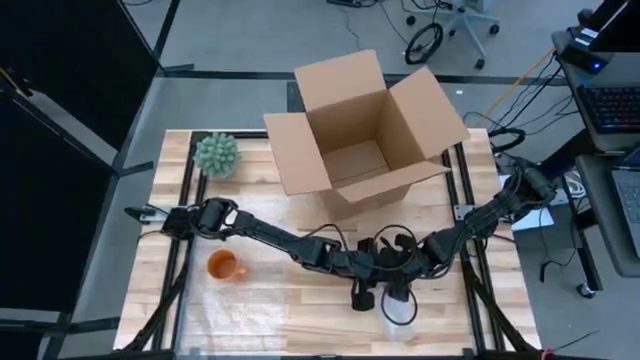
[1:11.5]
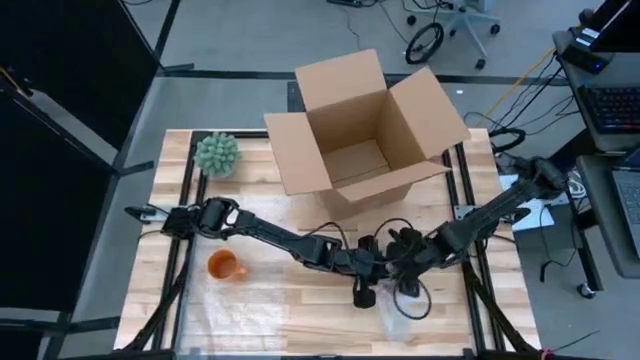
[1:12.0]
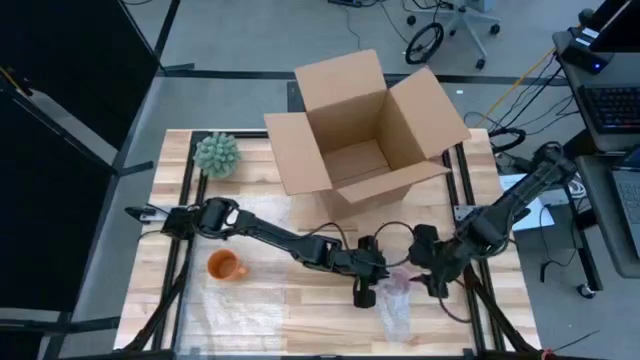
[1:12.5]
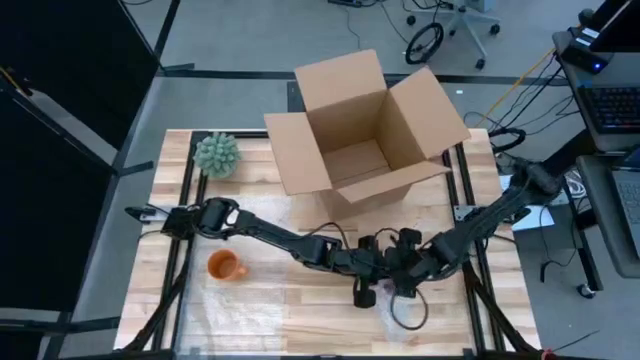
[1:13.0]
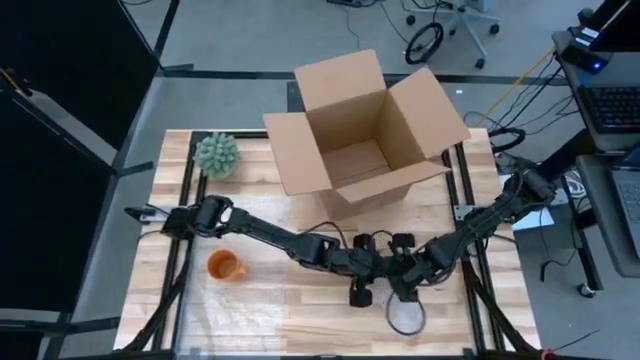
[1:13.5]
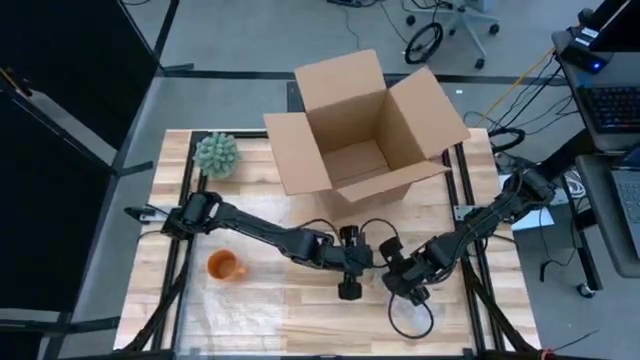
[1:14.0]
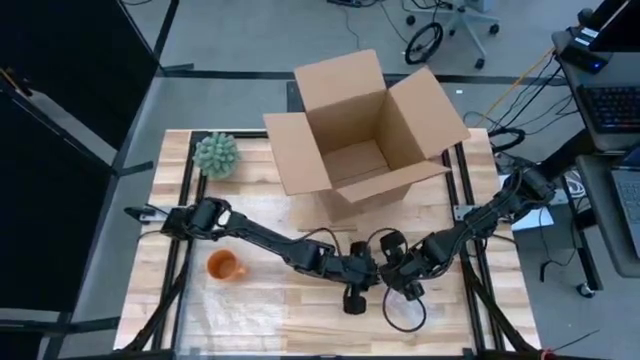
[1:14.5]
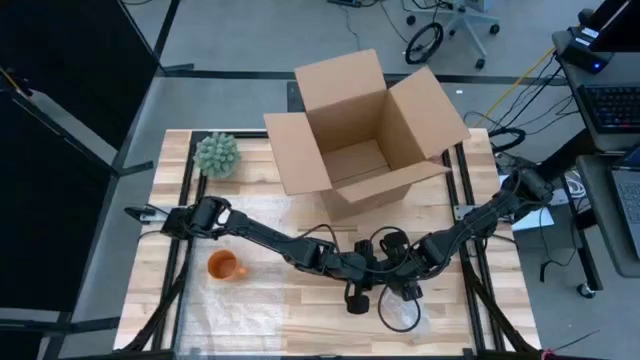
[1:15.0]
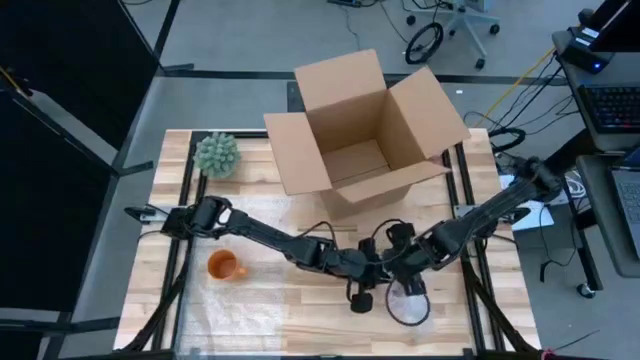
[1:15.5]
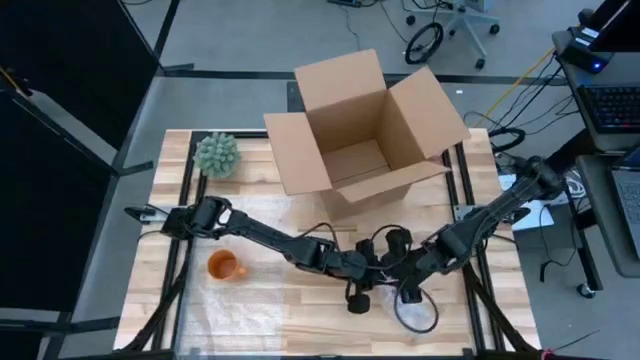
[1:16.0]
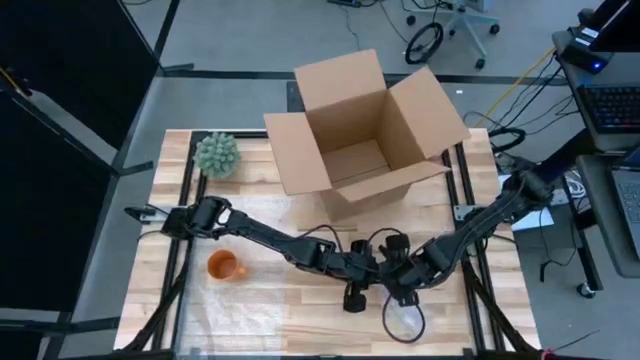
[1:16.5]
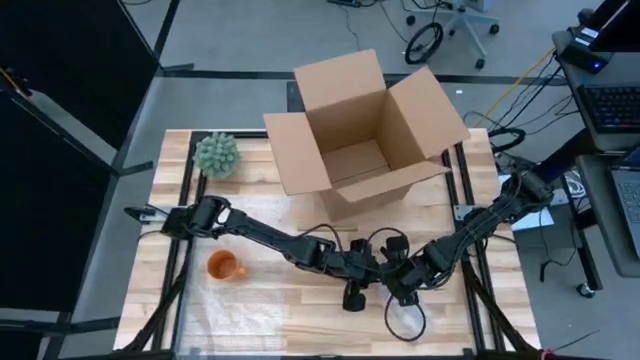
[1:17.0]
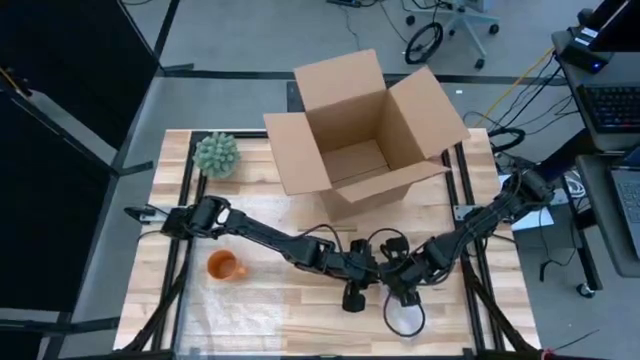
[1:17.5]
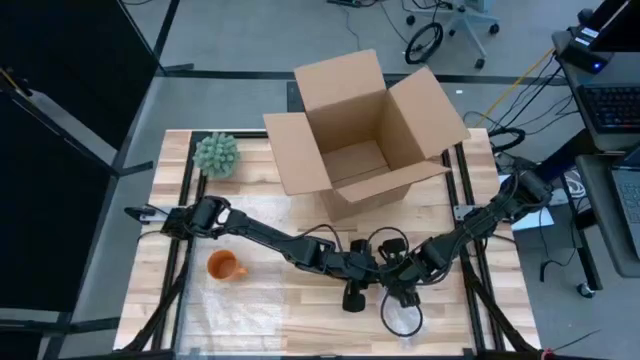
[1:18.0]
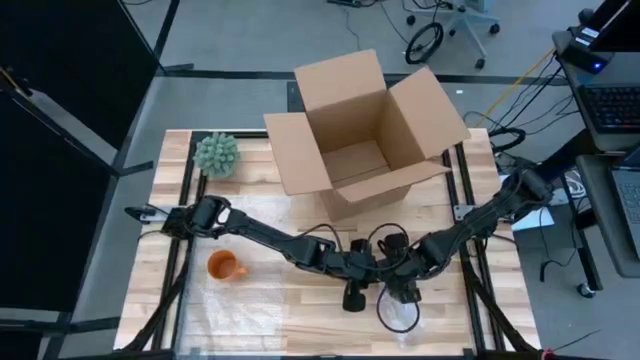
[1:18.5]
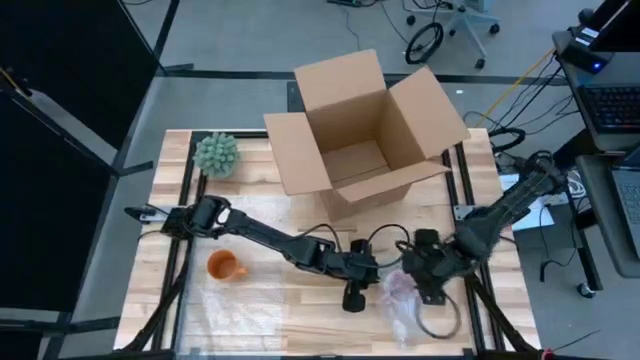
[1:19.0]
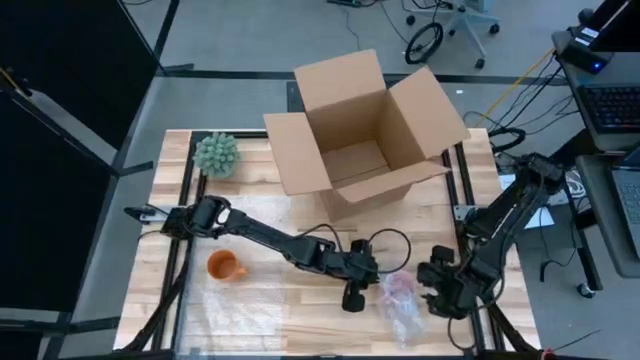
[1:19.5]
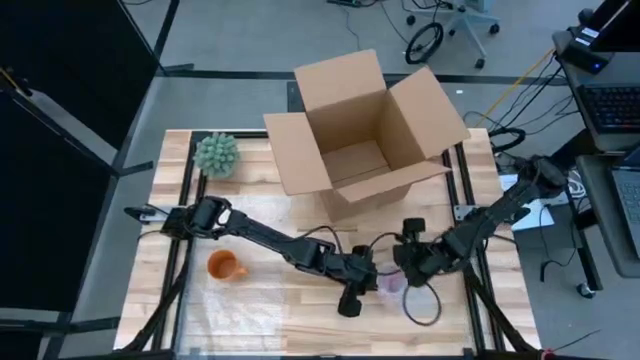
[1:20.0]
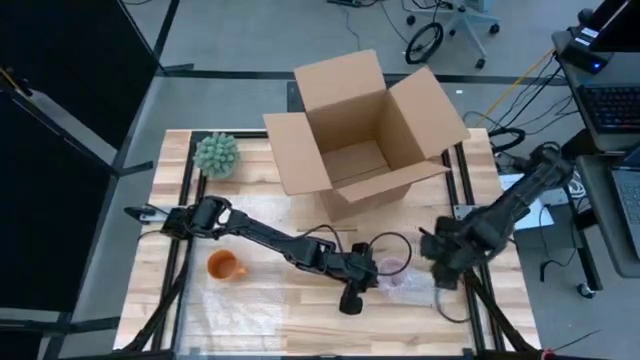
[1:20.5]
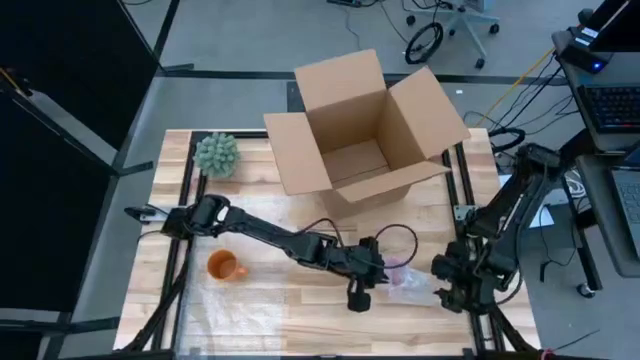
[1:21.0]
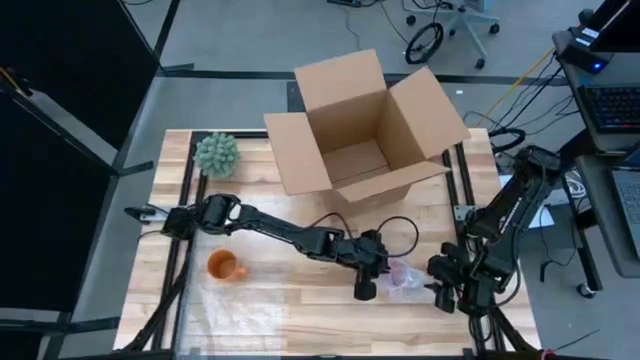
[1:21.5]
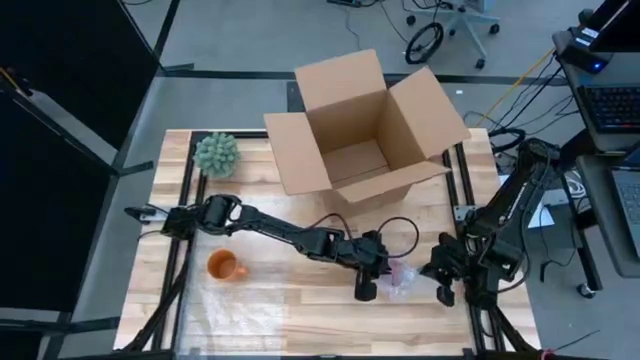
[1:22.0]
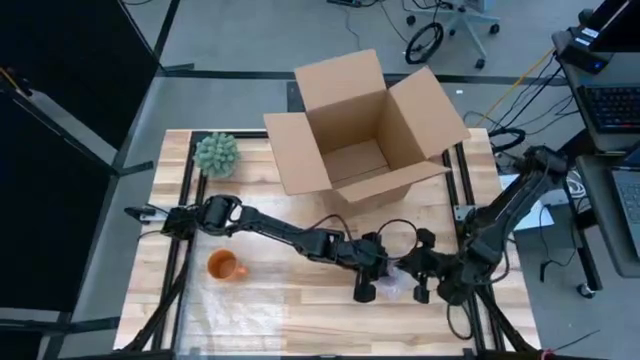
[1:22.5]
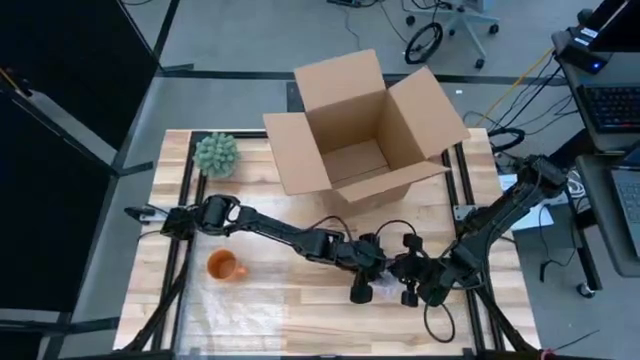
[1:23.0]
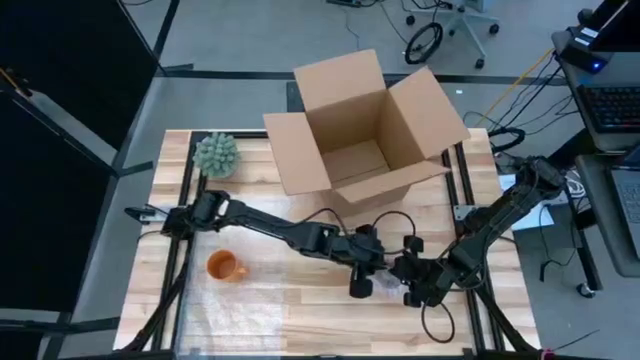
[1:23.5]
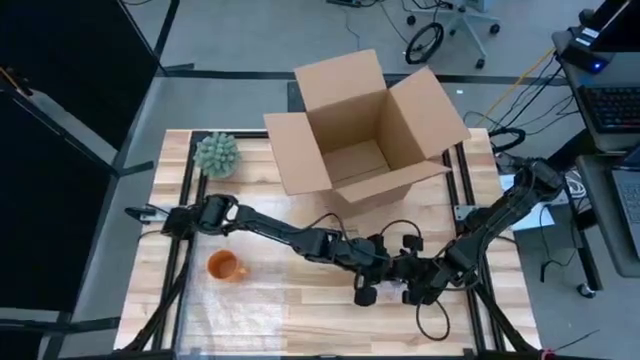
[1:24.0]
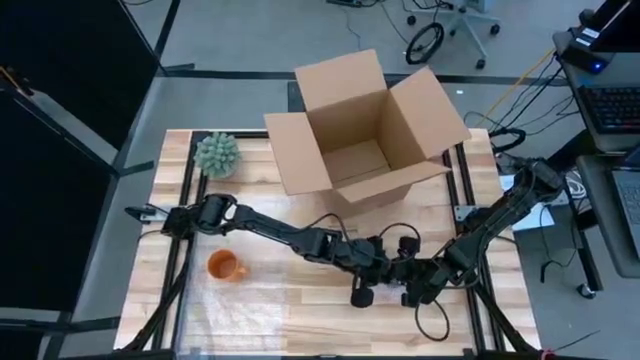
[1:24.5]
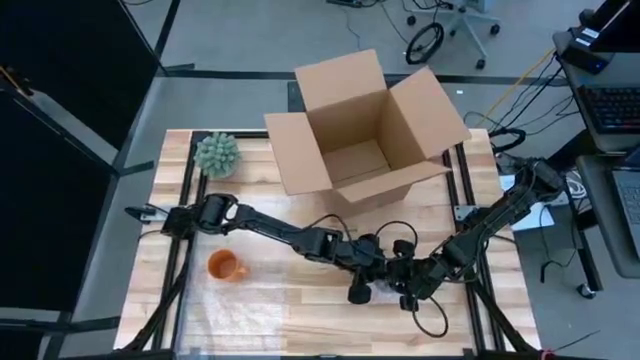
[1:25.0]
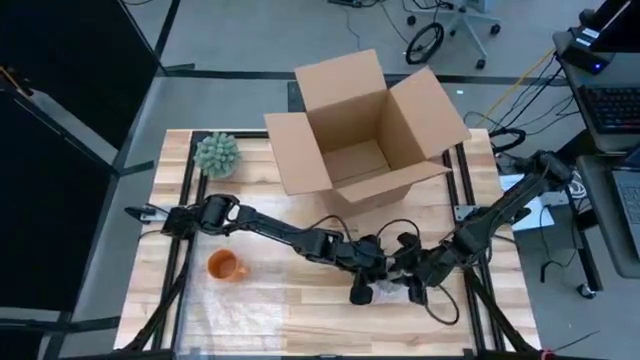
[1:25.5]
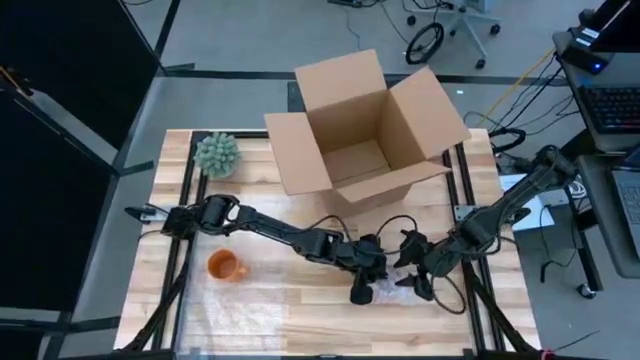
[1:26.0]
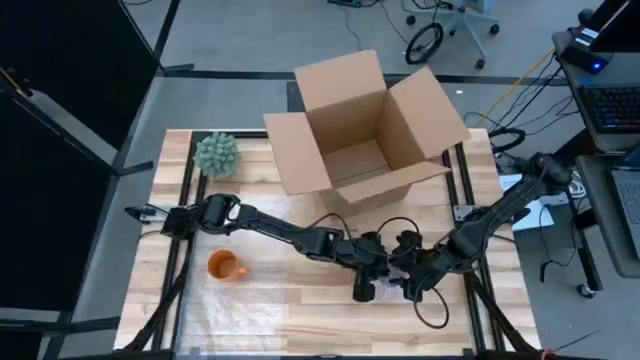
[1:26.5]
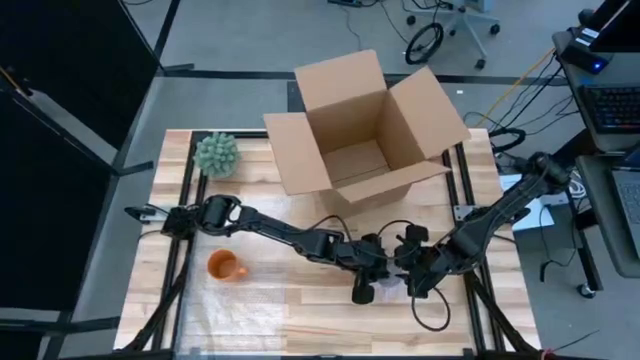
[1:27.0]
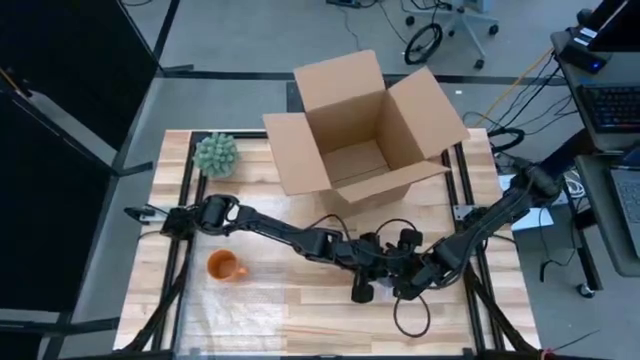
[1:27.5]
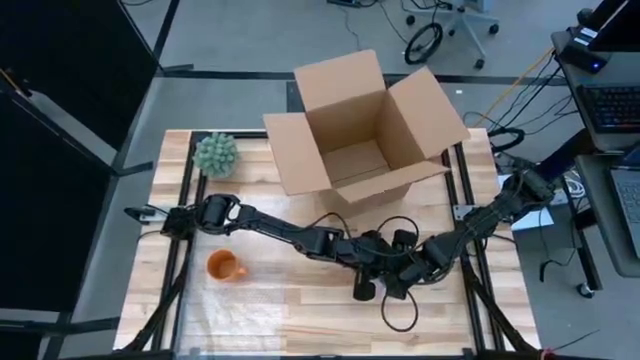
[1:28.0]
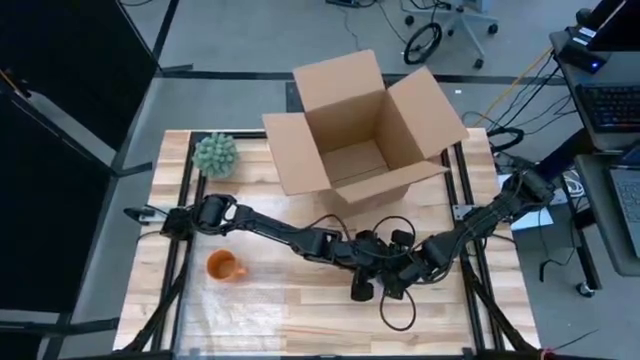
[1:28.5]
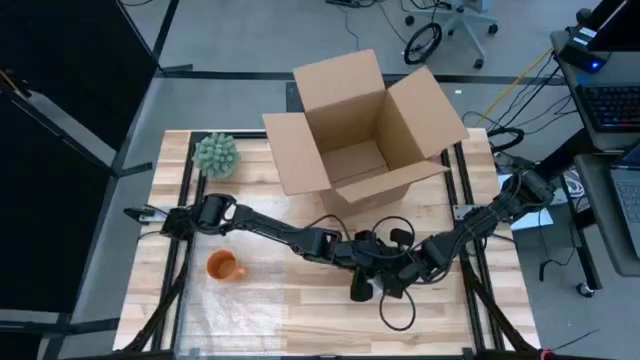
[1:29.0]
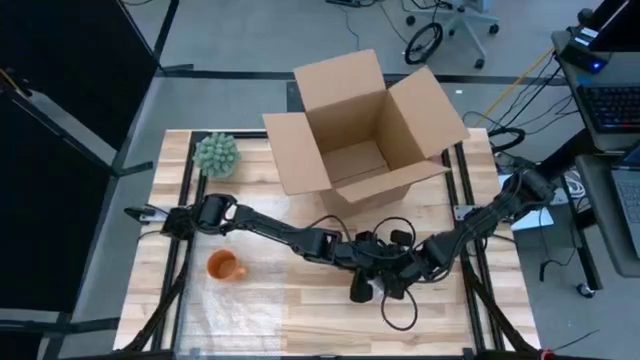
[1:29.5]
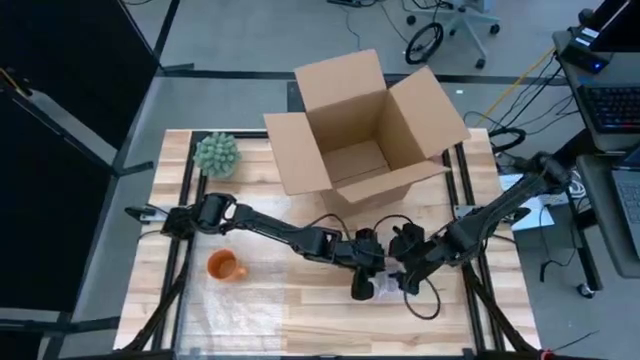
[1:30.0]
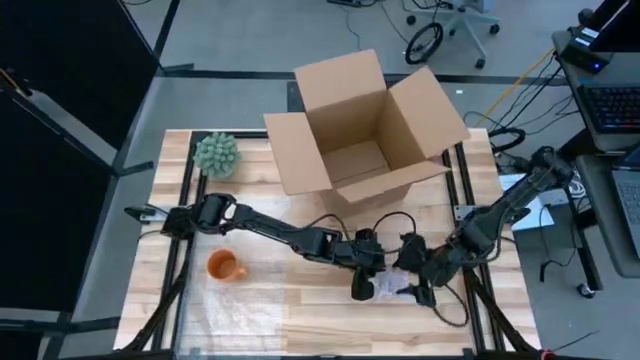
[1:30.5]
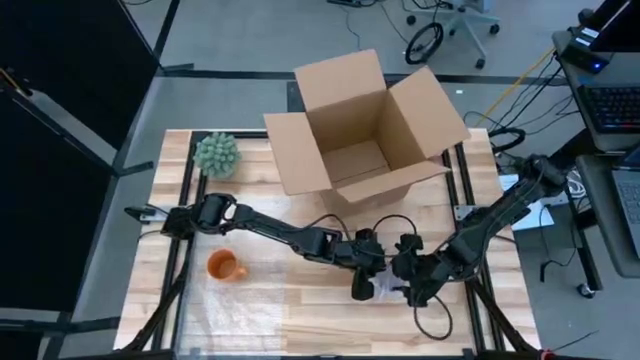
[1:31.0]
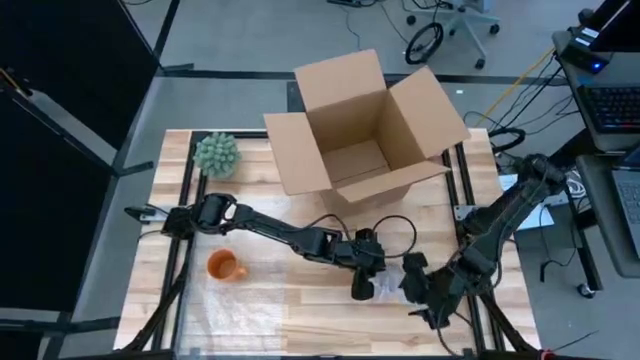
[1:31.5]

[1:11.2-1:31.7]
Task: wrap mug
Wrap the pink mug with bubble wrap

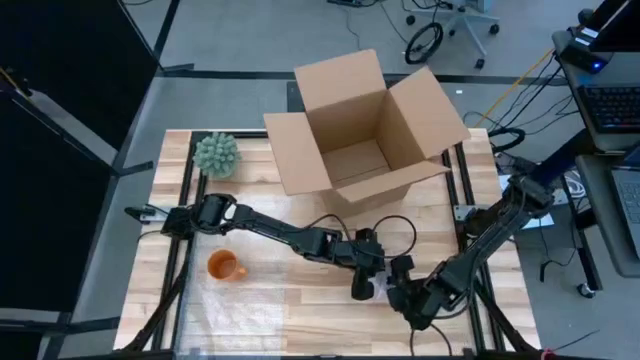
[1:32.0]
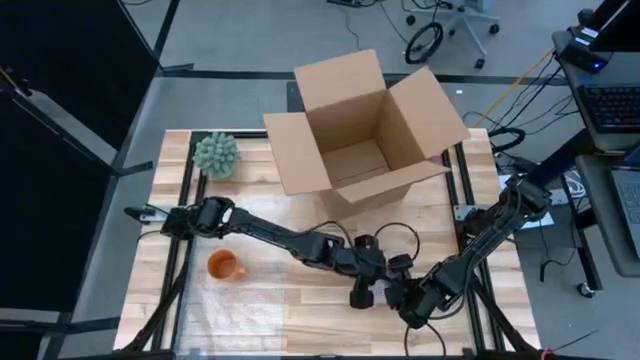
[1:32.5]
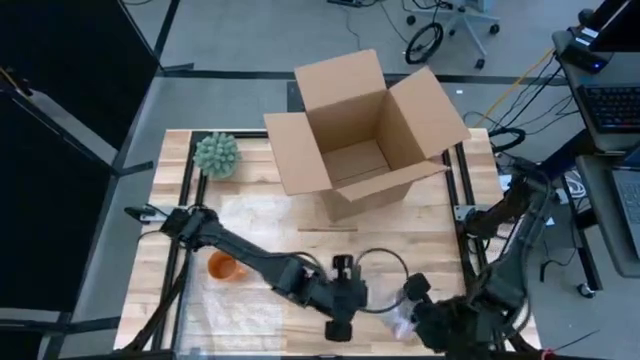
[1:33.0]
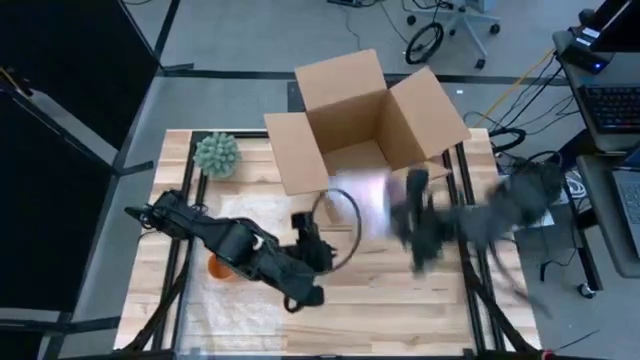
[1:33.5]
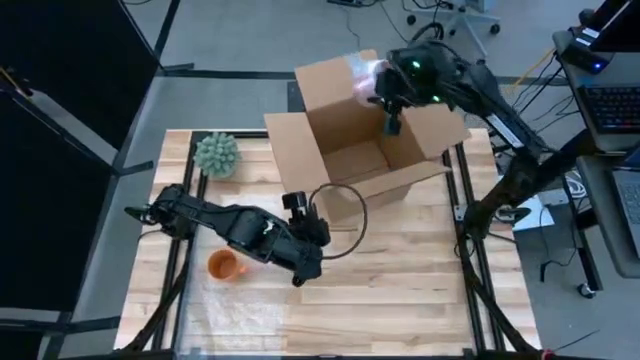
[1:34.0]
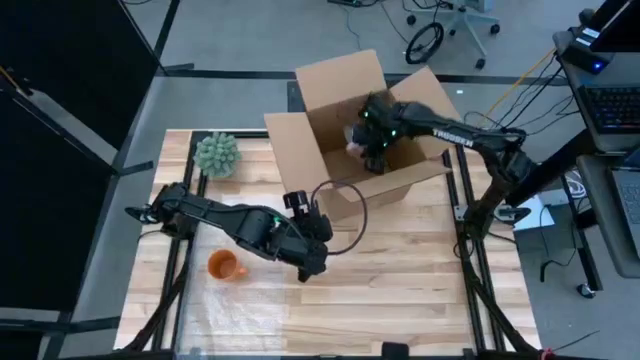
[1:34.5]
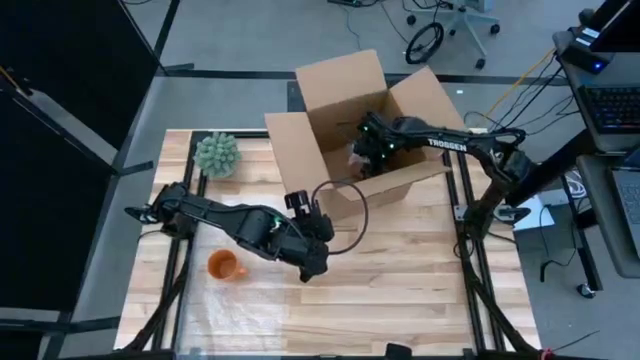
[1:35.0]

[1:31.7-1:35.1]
Put the wrapped pink mug into the cardboard box
